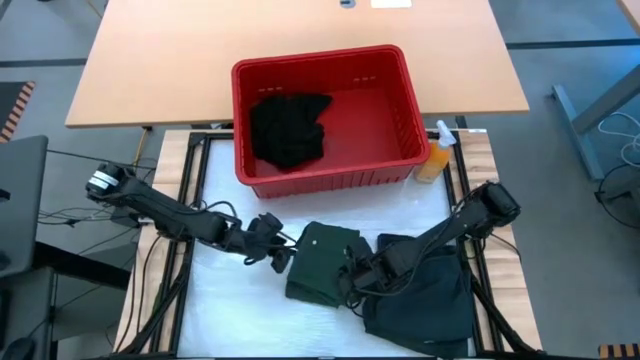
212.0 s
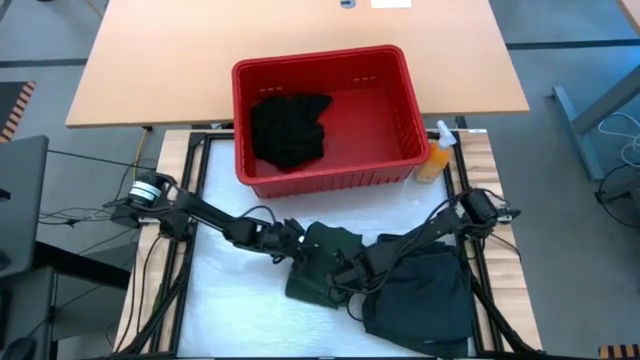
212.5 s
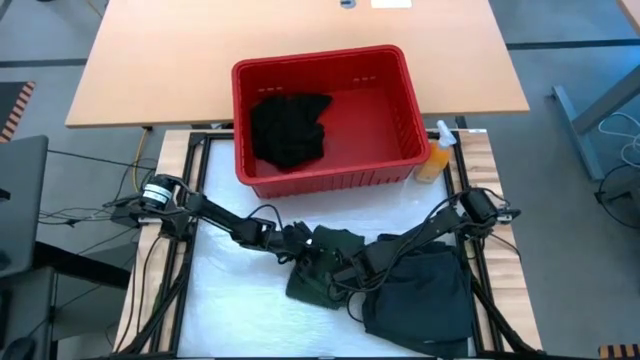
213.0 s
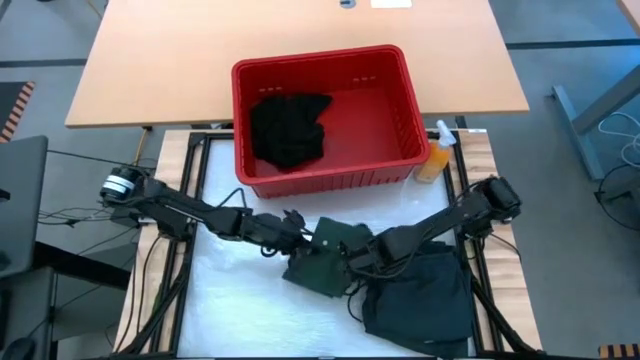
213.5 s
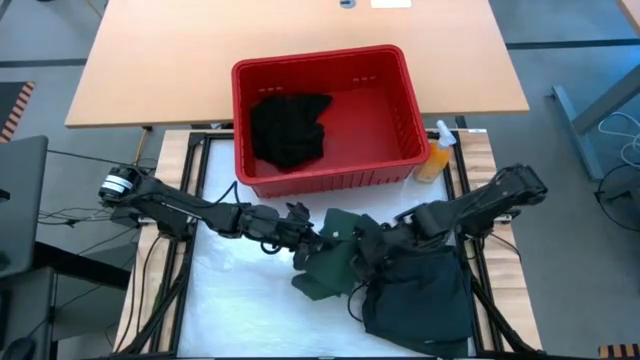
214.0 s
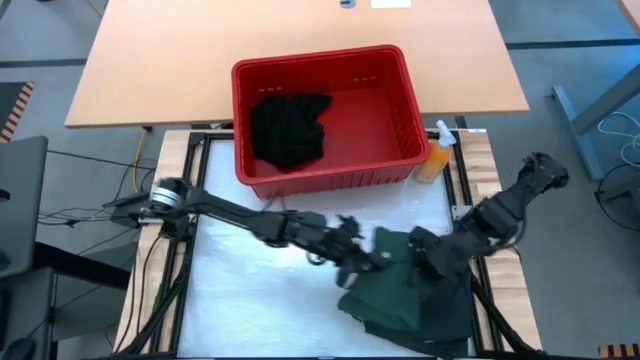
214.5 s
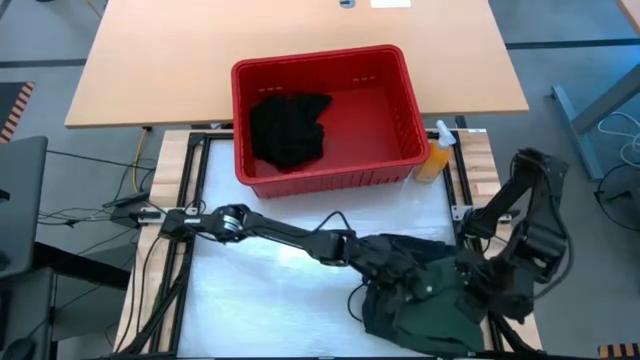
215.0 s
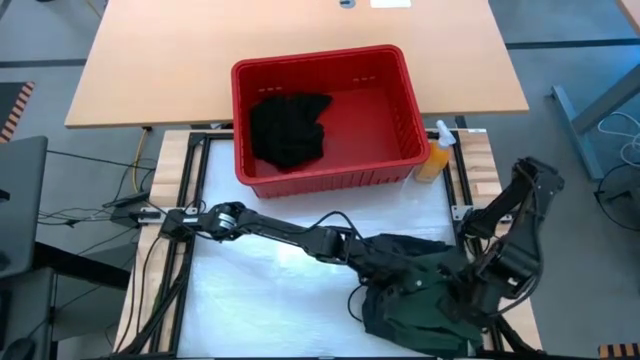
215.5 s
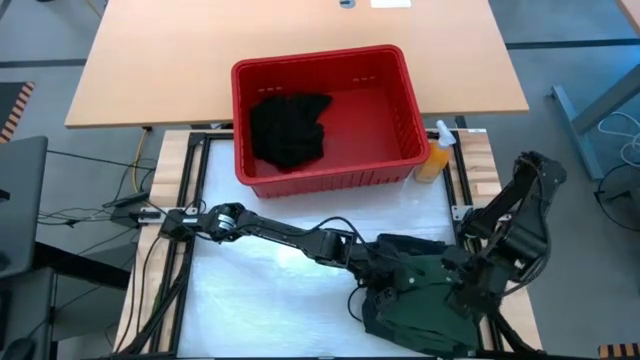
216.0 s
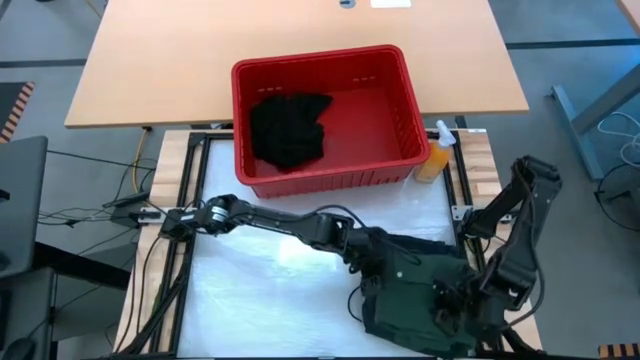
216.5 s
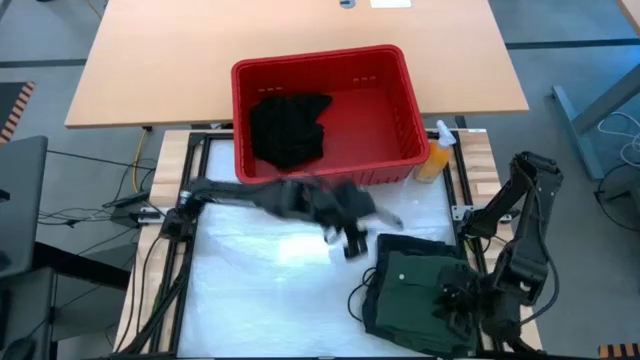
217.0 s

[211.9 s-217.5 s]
Task: Fold laundry
Stack the folded green shirt on top of the folded gray shorts

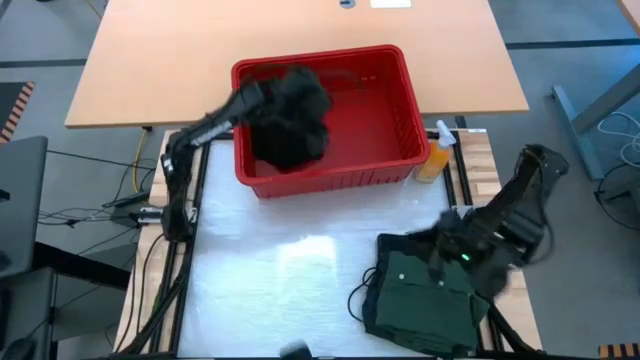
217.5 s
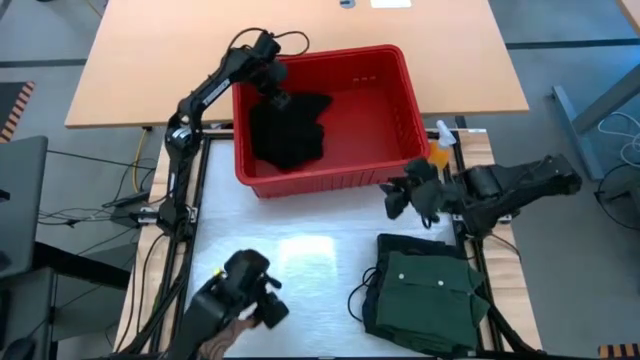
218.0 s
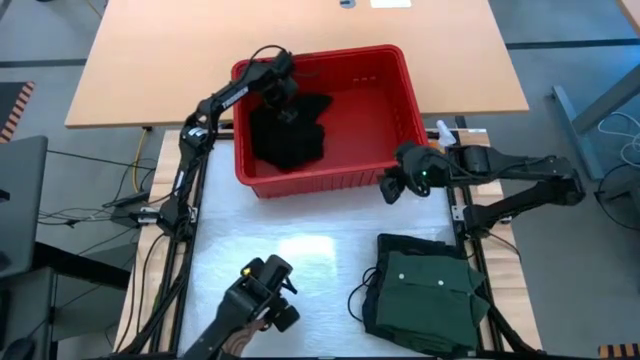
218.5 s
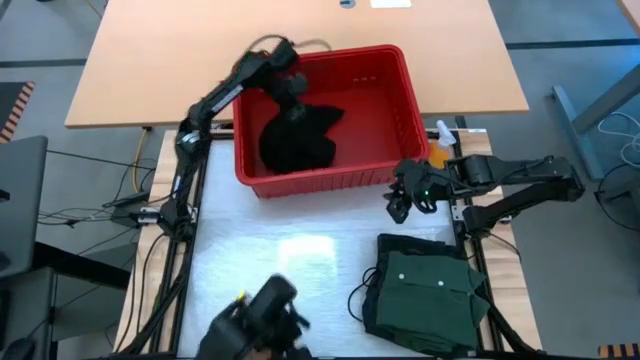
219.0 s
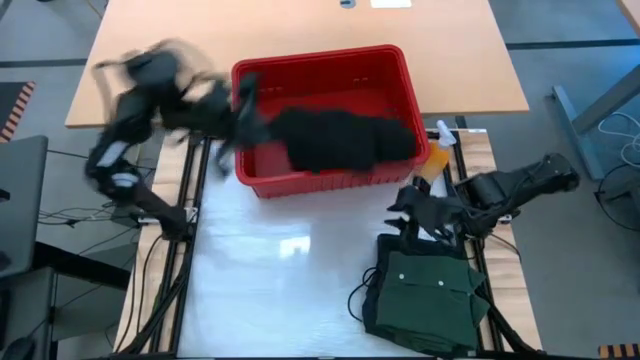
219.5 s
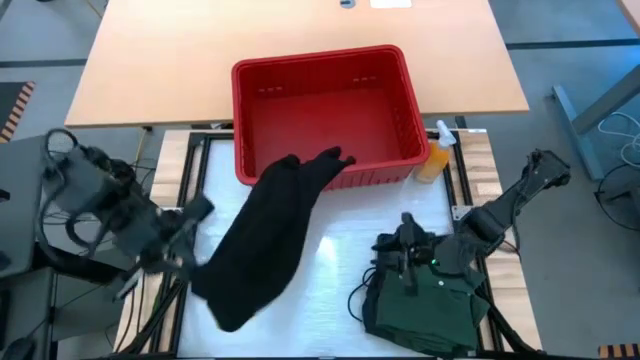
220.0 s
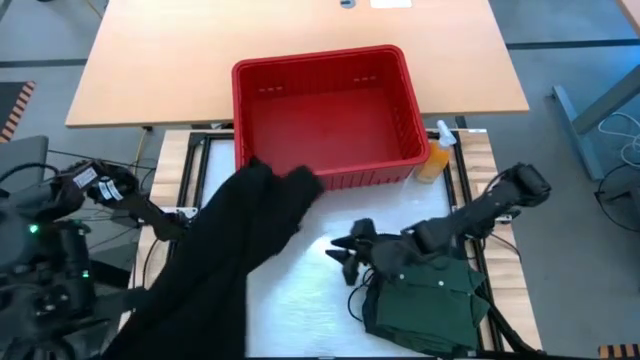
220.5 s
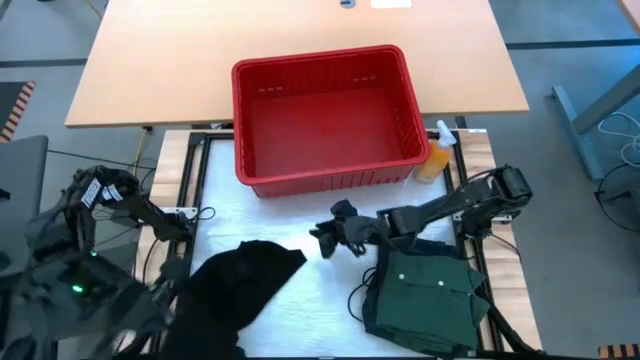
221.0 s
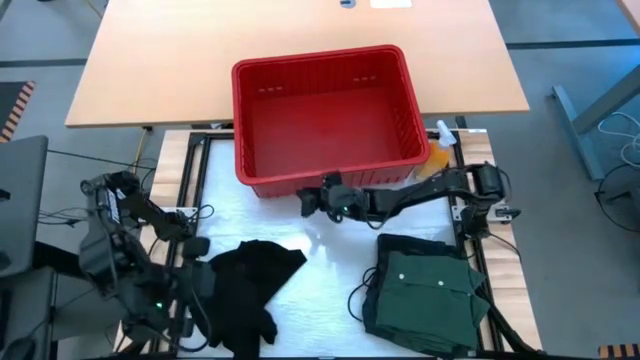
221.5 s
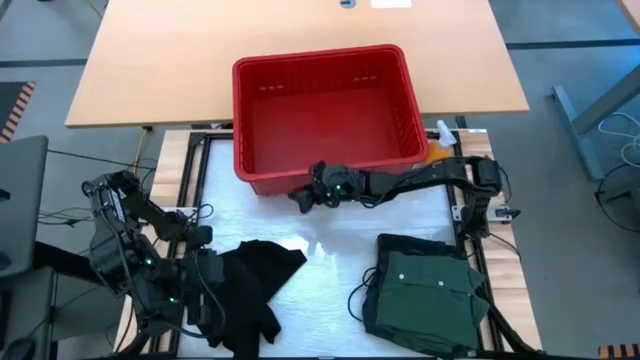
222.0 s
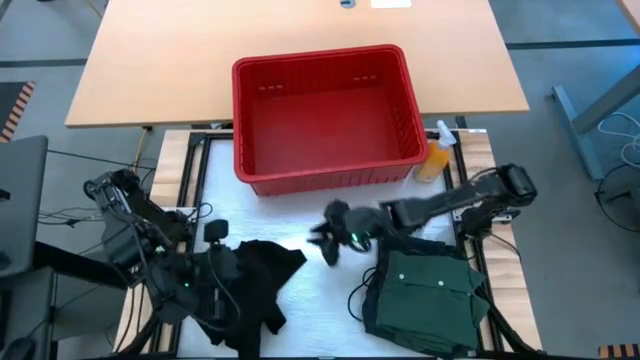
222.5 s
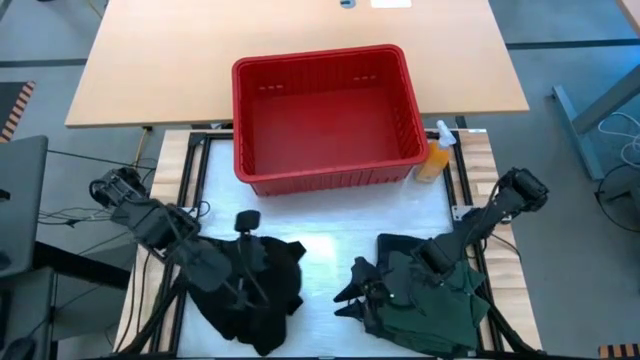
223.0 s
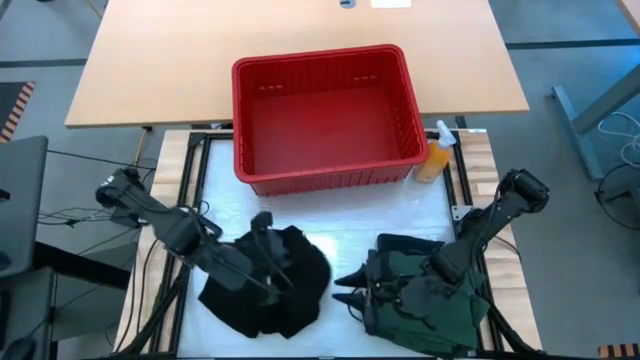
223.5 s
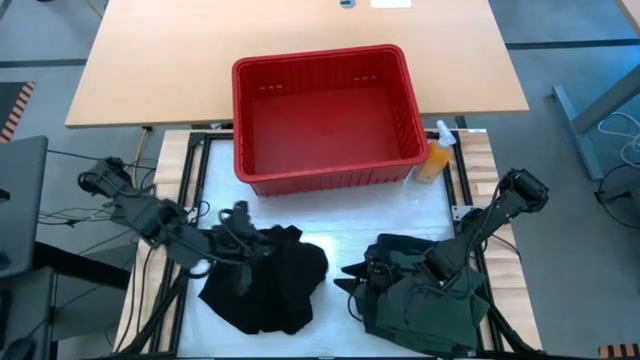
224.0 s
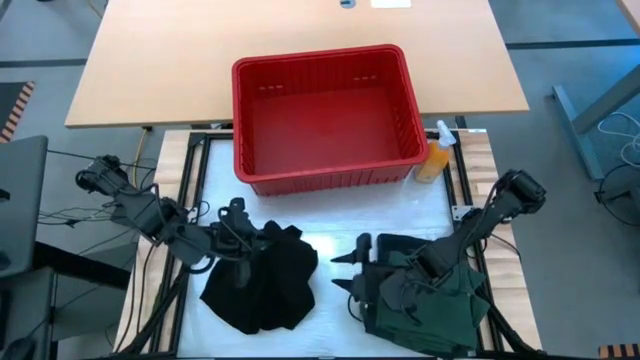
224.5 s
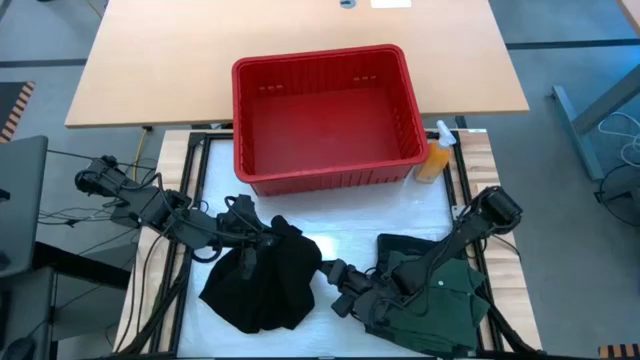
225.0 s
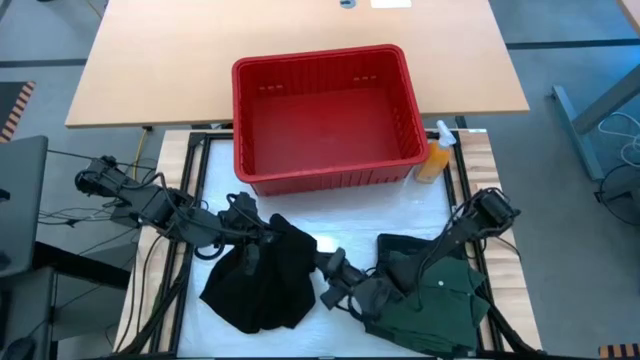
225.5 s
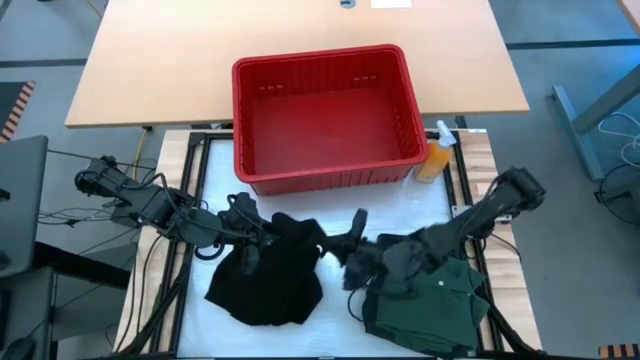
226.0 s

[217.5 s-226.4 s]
Remove the black shirt from the red bin

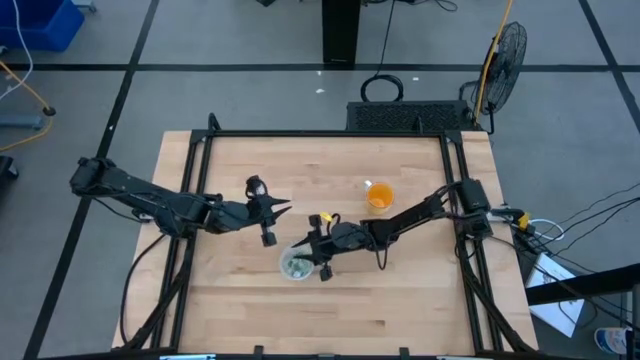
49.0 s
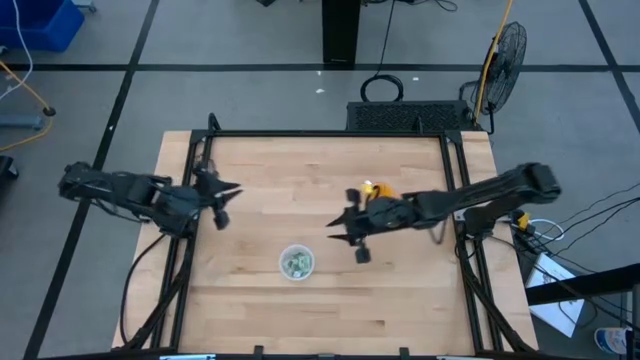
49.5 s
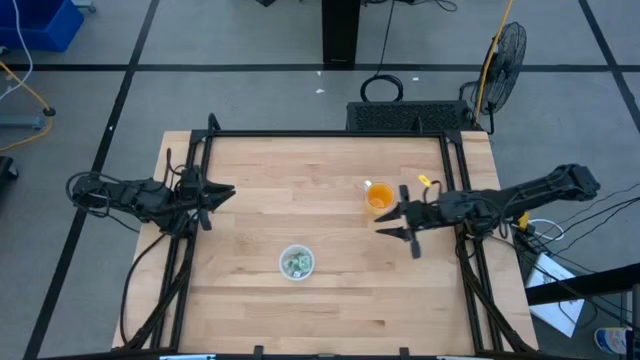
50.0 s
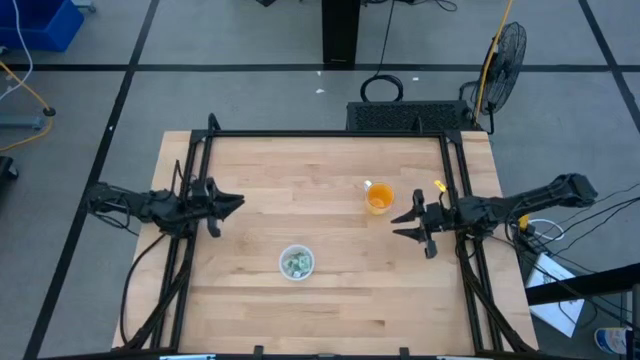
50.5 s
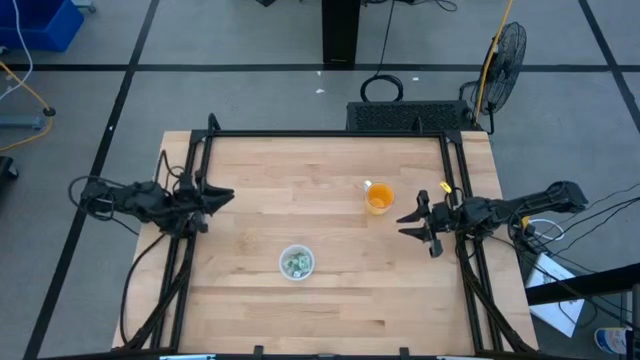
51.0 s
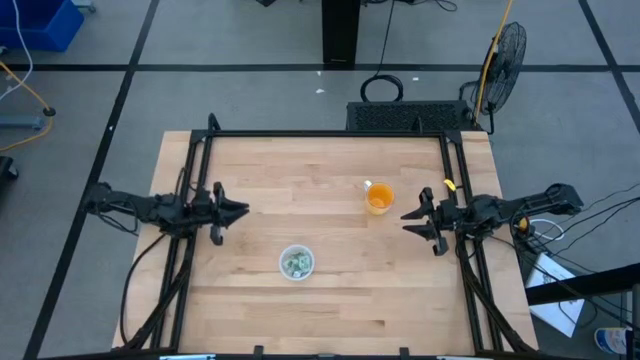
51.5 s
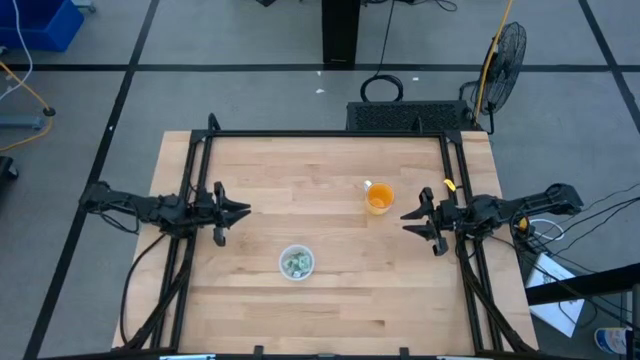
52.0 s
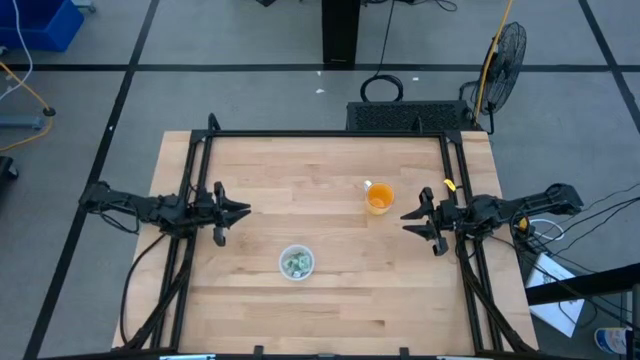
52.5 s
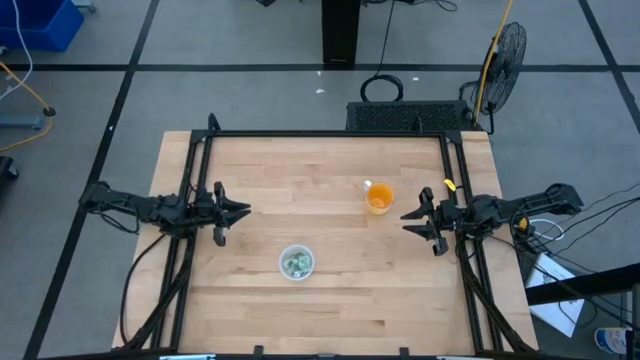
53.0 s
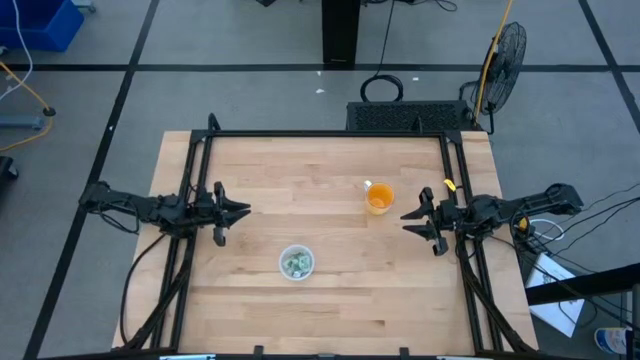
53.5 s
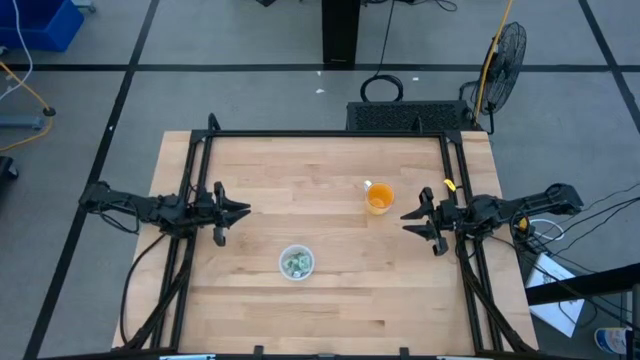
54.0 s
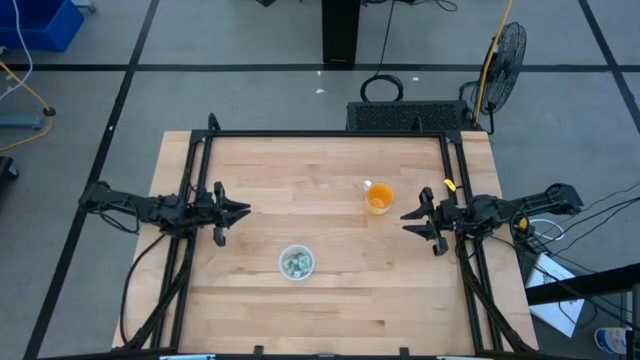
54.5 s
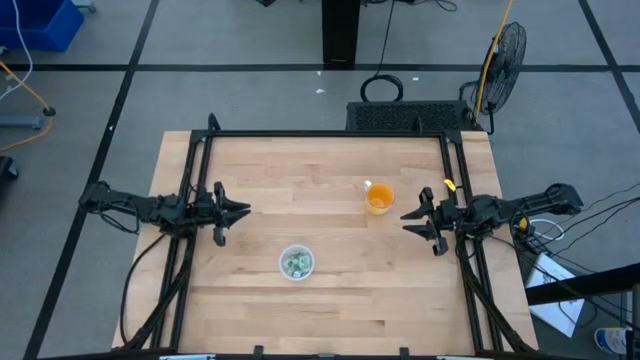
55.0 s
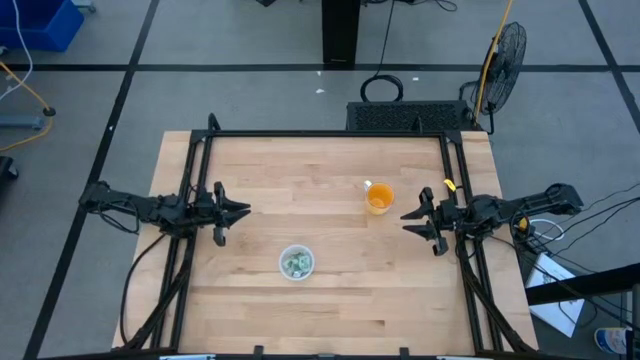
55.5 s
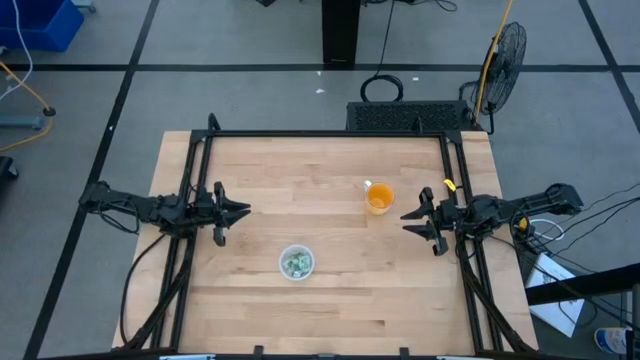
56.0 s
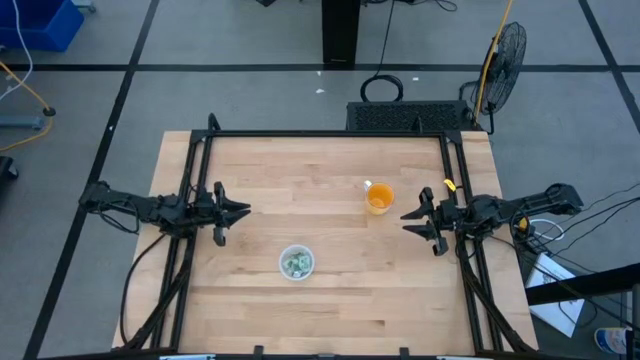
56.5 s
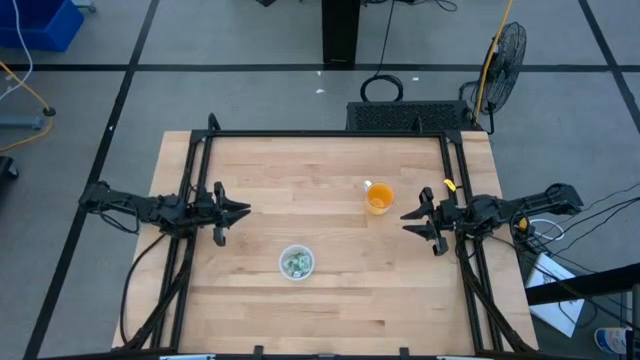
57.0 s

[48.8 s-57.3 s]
Task: Pick and place items into bin
Return to Home Position
